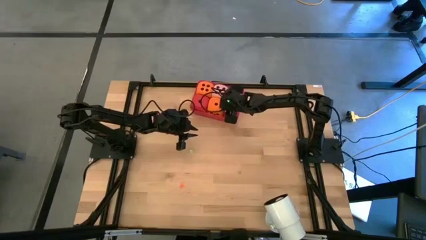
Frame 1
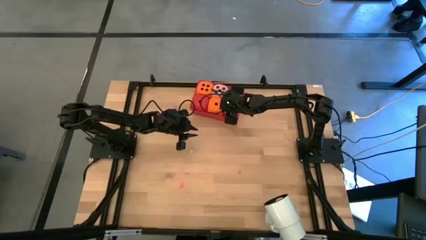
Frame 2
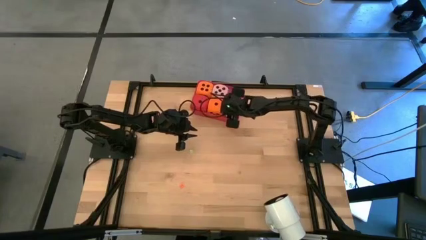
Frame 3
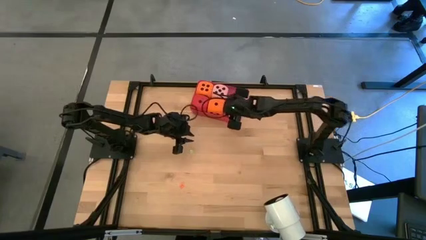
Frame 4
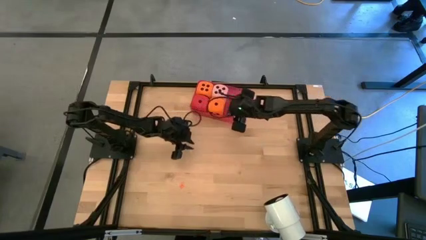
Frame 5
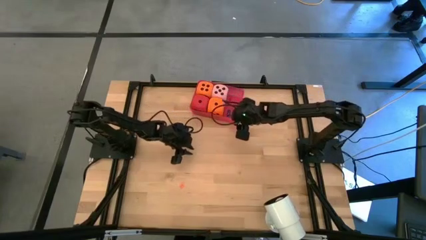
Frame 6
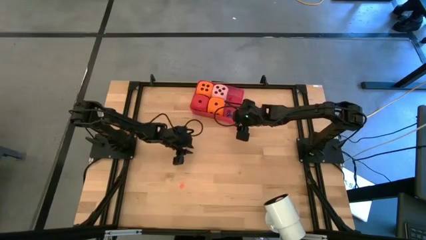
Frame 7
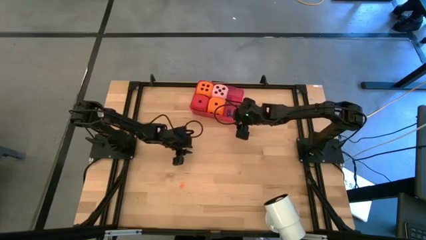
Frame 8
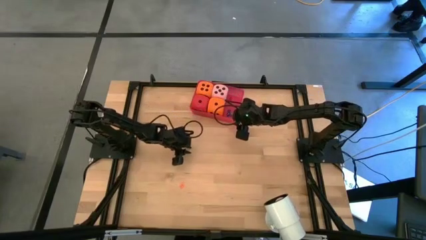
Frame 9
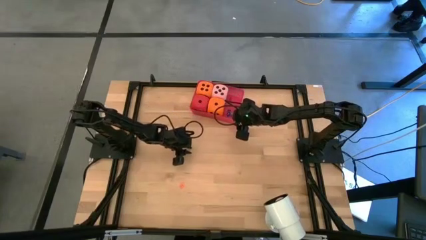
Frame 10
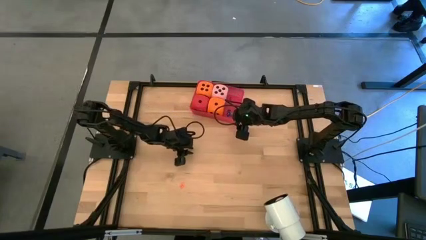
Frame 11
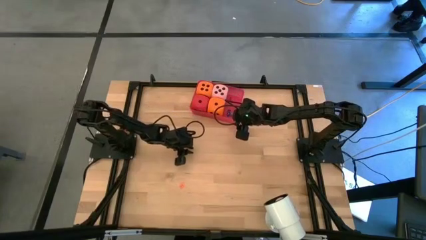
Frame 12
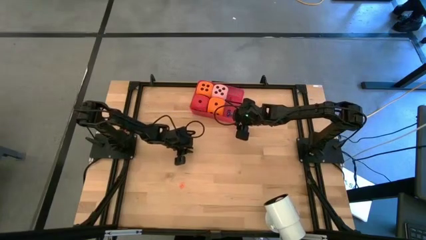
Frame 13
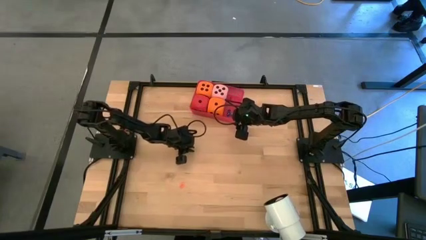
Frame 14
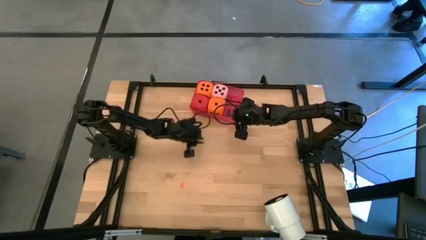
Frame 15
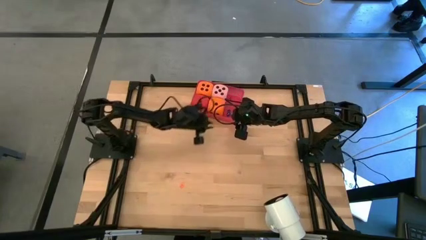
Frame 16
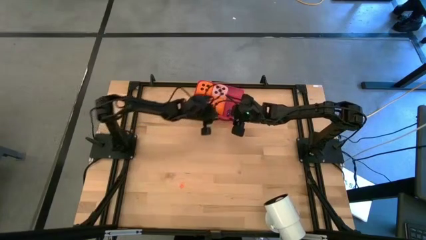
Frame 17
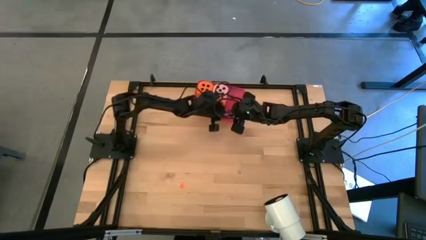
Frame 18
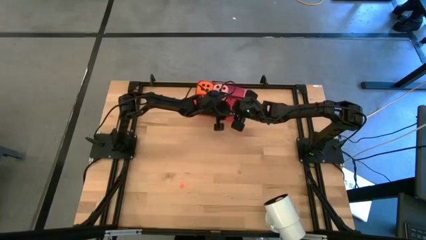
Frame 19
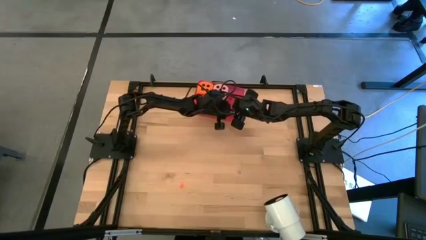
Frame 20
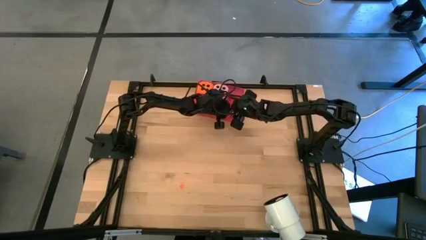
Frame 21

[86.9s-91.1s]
Task: Pick & Place Dice
Put the small light green die into the red bin

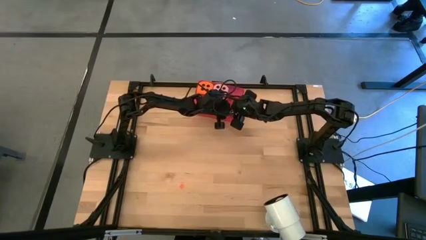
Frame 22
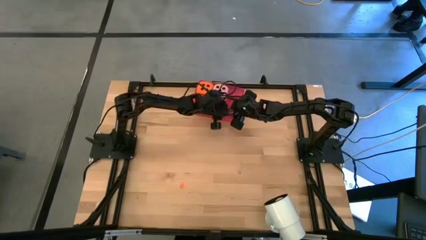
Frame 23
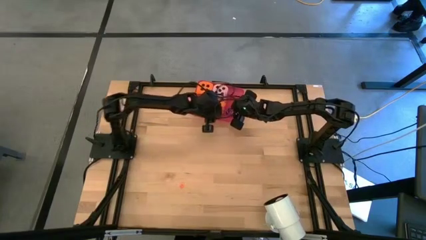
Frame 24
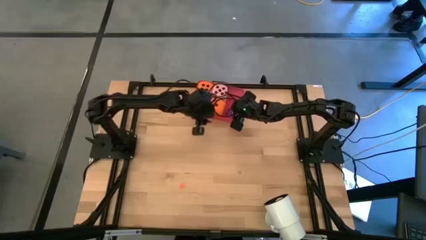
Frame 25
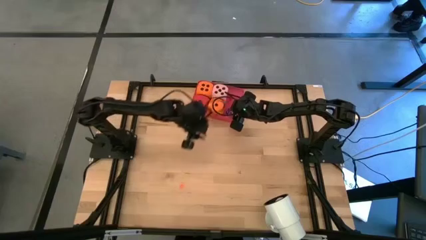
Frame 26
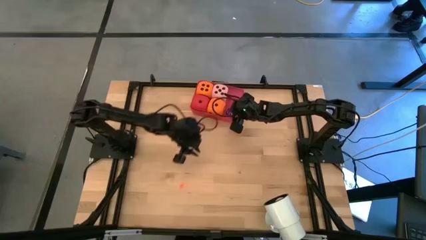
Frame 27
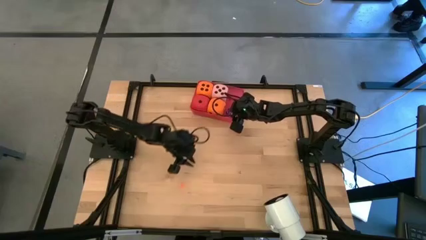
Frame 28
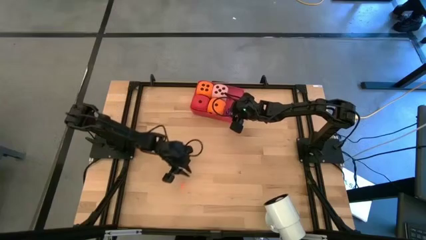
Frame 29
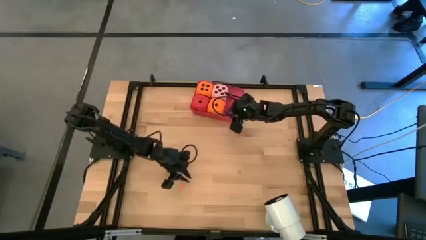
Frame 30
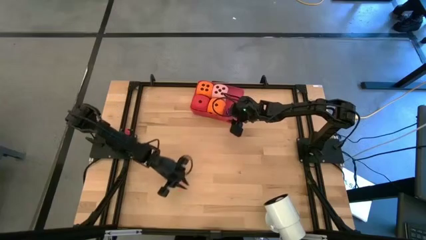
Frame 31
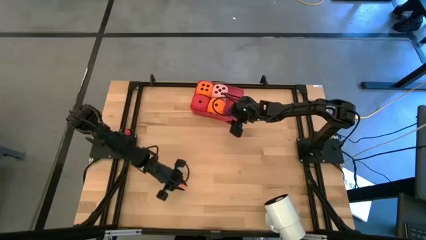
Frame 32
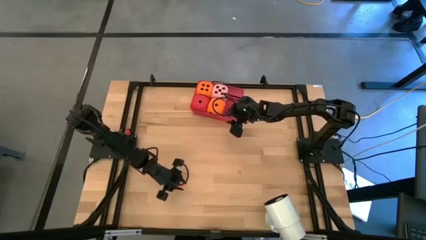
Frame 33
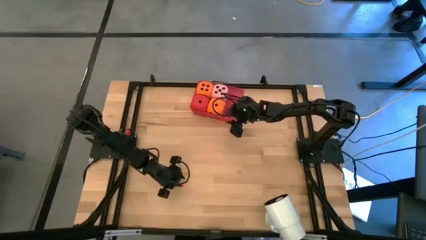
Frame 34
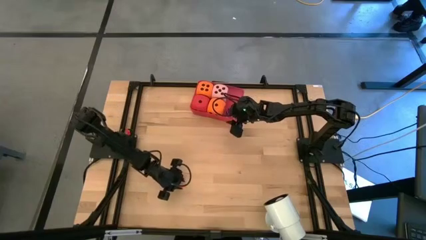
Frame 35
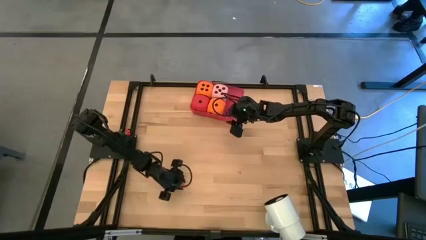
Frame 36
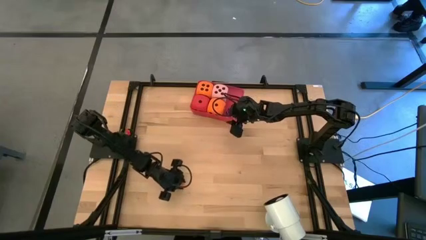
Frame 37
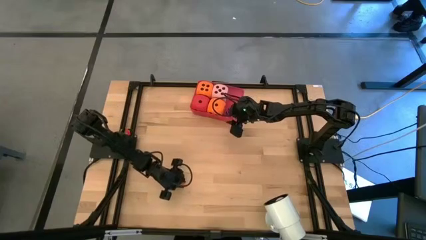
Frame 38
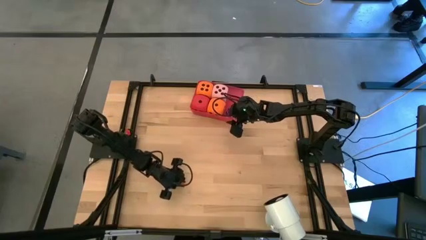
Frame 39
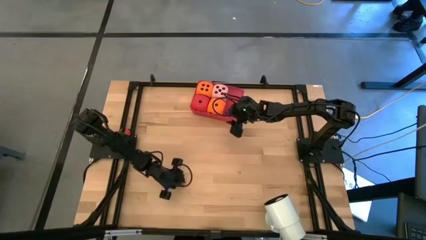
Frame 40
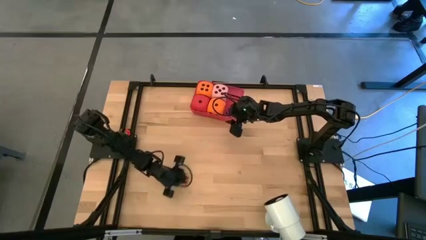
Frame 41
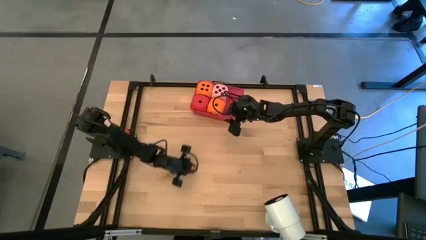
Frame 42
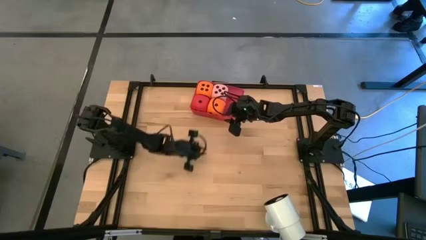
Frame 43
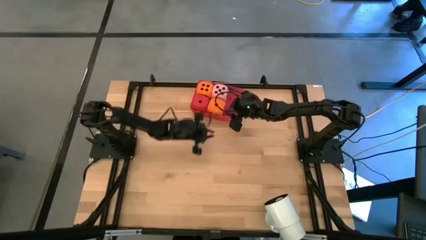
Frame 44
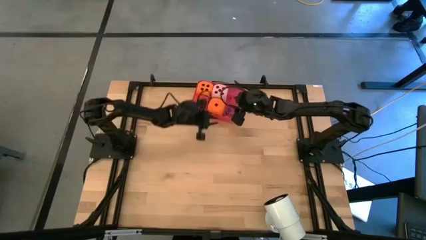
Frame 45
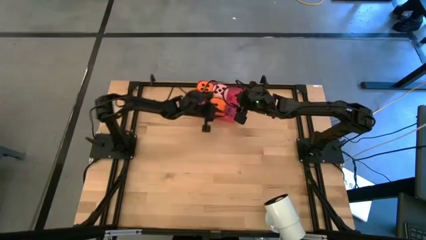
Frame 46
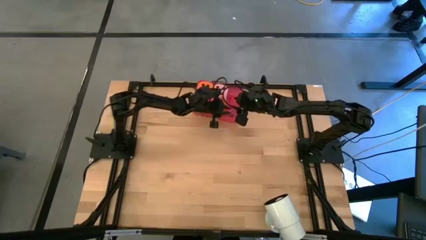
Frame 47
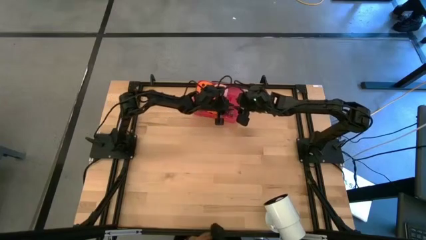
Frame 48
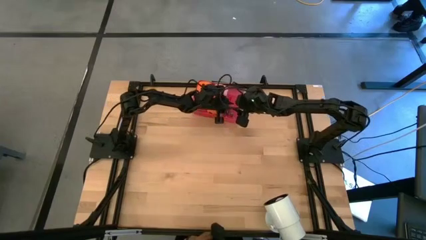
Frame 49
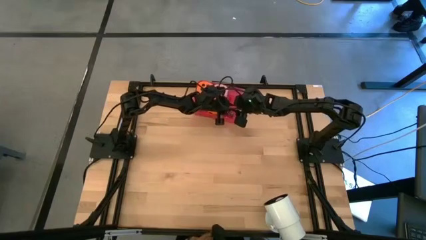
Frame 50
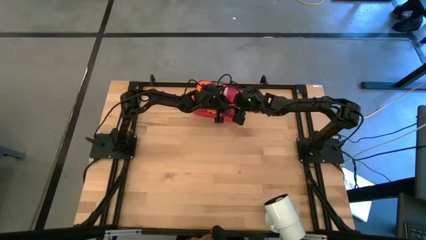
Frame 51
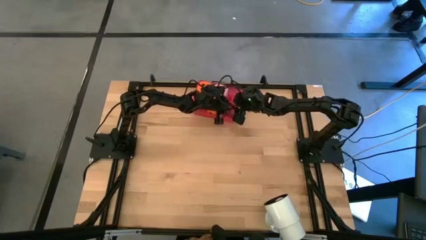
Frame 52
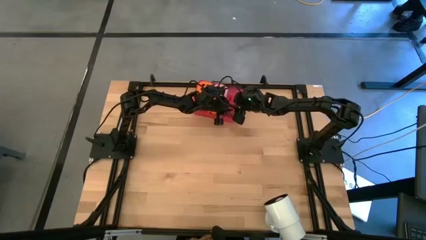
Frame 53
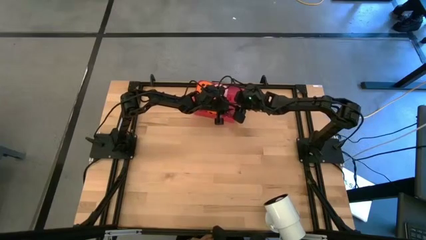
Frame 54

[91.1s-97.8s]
Put the small orange die into the red bin

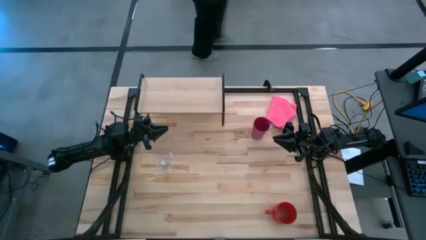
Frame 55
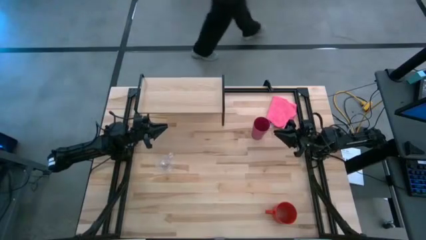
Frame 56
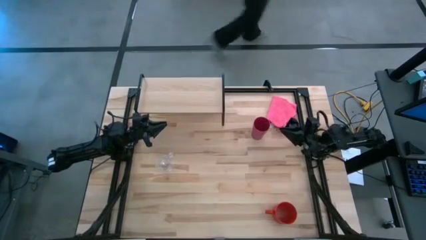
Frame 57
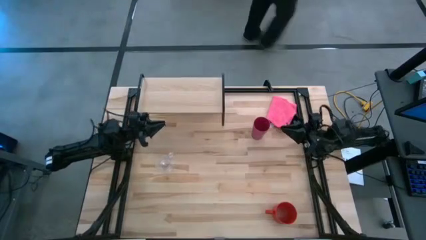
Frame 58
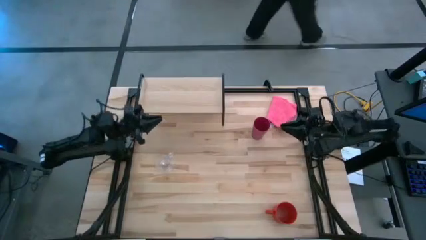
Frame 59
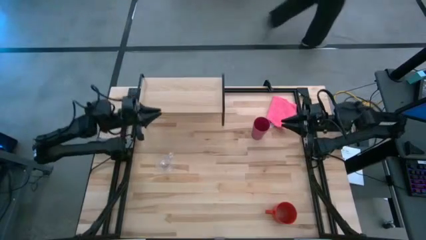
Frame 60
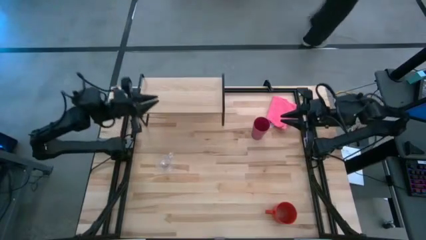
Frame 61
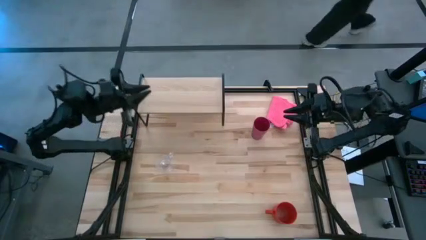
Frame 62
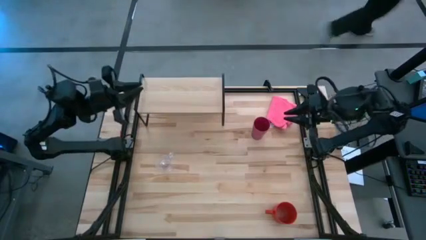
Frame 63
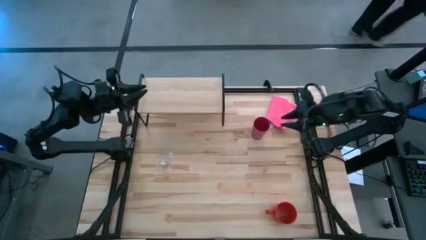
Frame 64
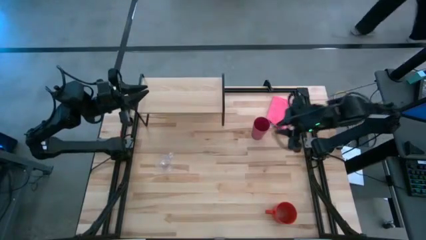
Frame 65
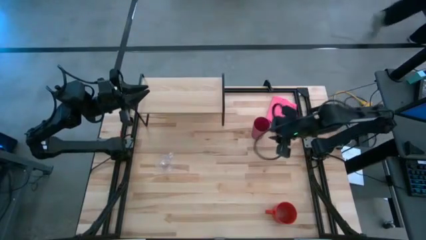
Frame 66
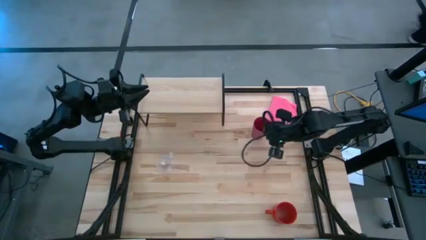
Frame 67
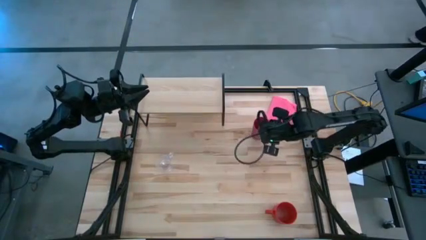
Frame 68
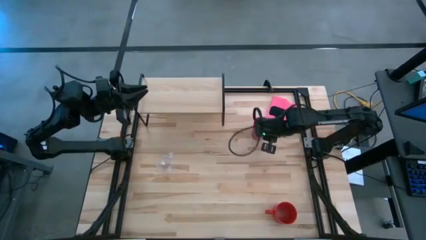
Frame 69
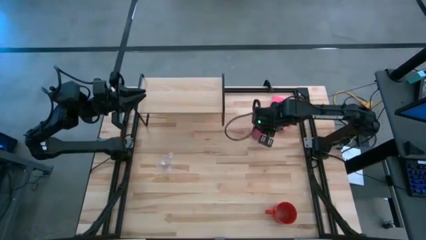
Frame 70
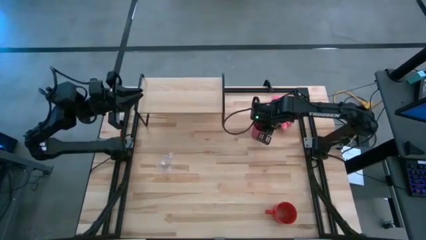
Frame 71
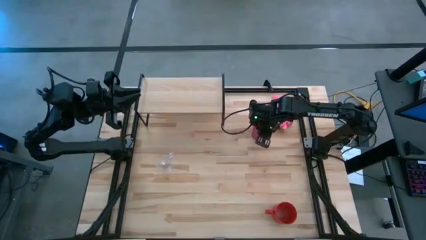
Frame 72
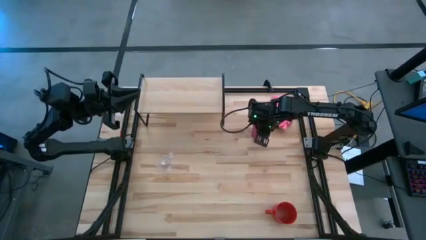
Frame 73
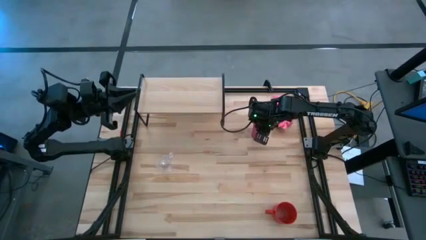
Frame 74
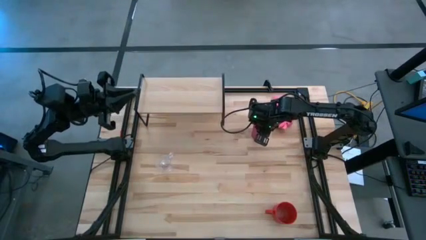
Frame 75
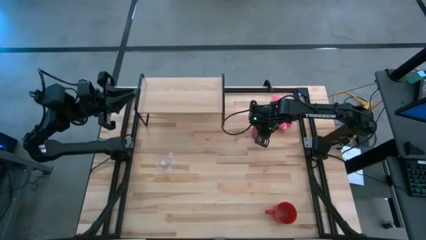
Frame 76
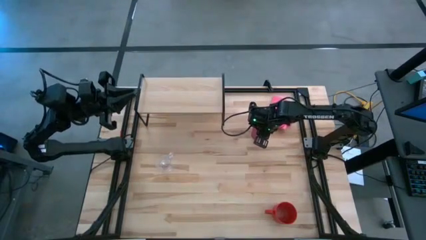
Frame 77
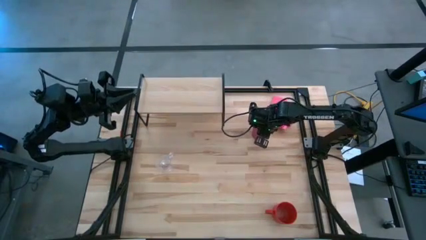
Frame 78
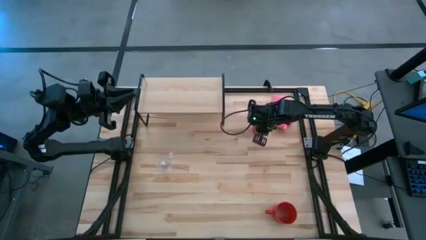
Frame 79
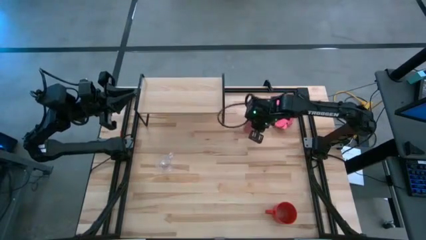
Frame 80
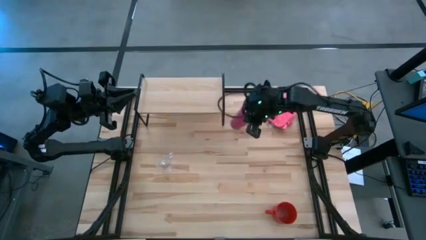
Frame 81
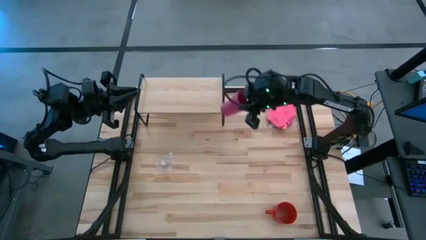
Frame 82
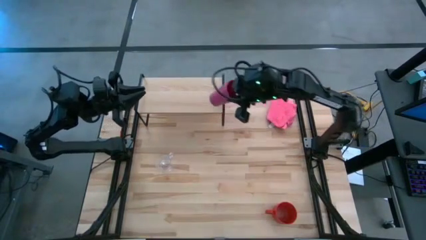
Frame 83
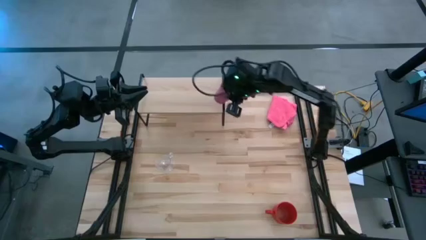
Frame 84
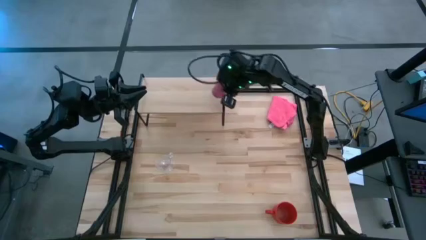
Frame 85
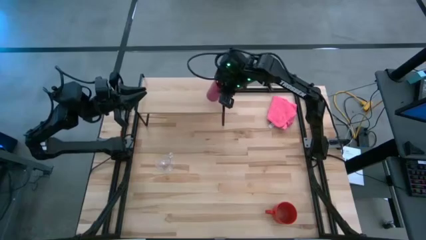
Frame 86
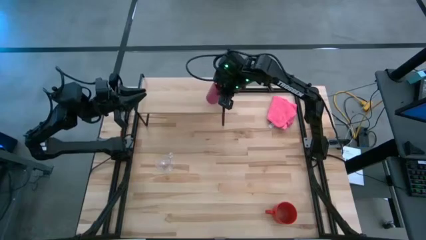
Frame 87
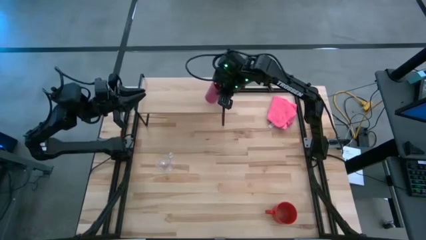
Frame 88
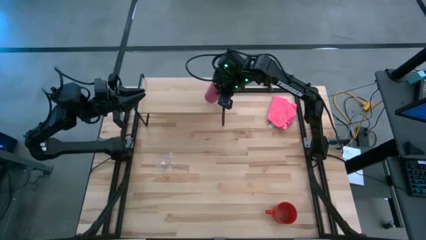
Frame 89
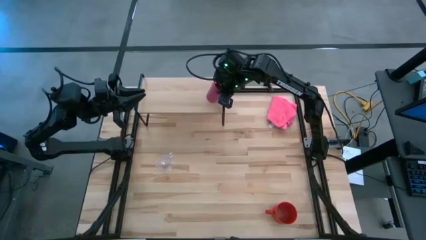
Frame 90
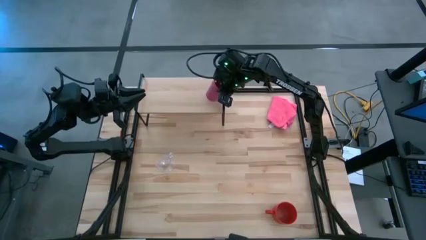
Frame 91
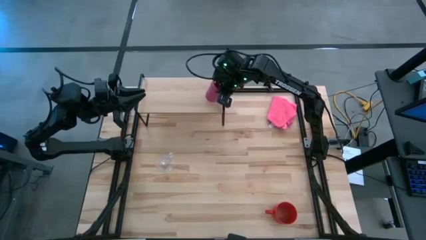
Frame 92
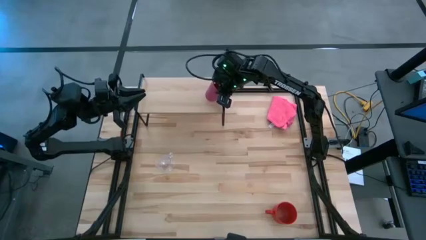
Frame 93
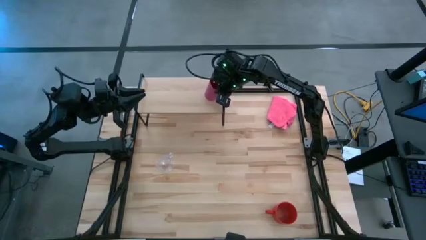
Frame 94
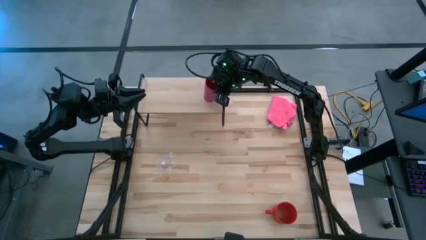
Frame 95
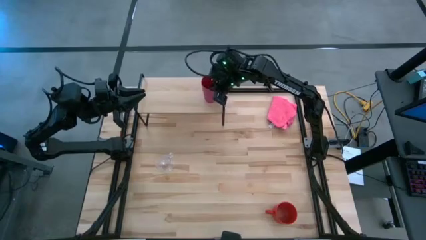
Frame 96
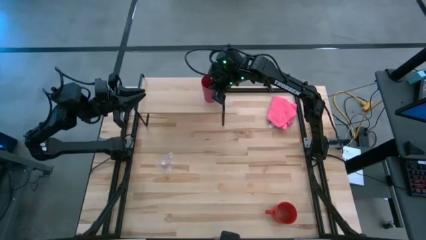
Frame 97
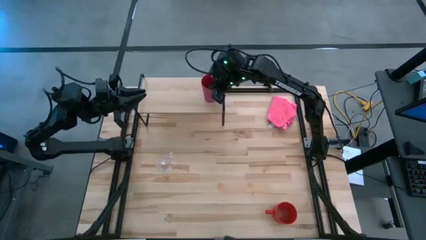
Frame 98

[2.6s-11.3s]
Task: Stack small to large cups/mugs on shelf
Put the pink cup on the shelf
